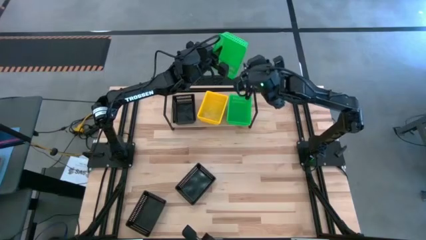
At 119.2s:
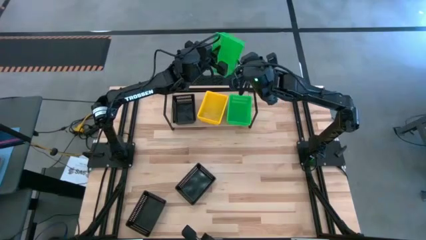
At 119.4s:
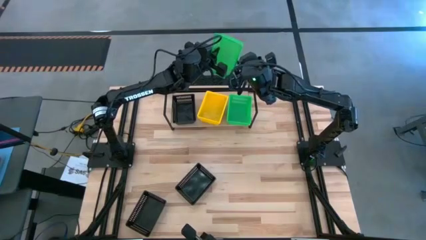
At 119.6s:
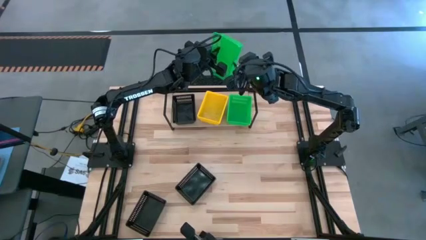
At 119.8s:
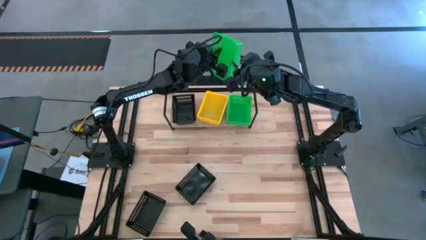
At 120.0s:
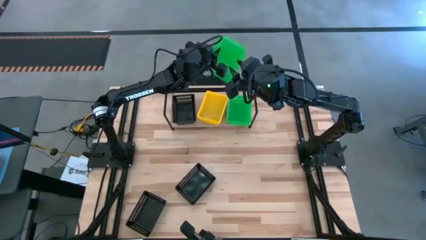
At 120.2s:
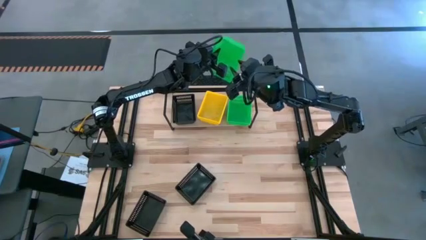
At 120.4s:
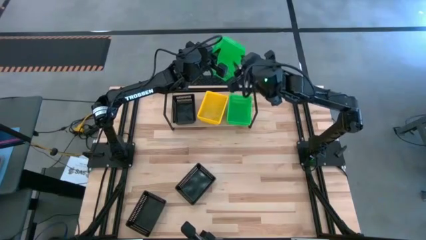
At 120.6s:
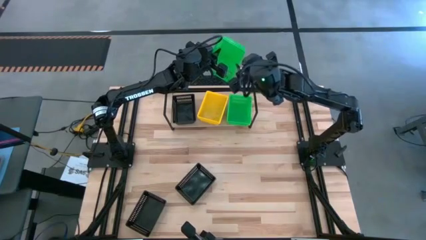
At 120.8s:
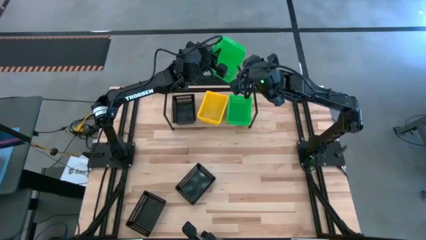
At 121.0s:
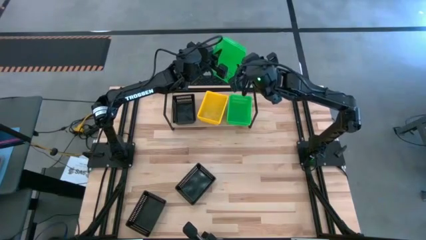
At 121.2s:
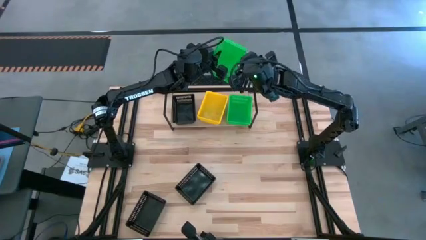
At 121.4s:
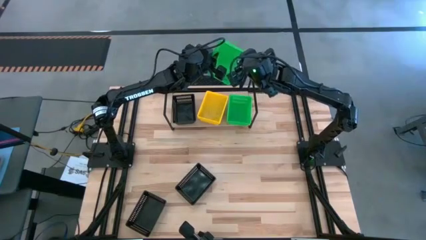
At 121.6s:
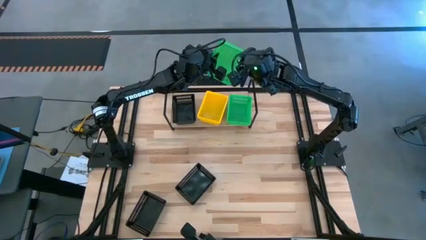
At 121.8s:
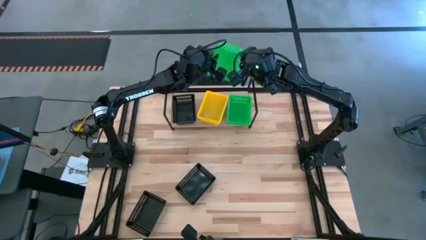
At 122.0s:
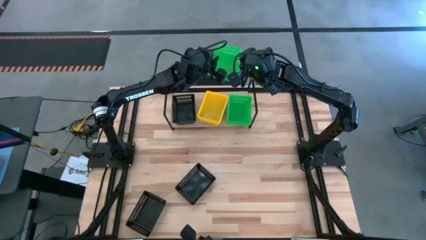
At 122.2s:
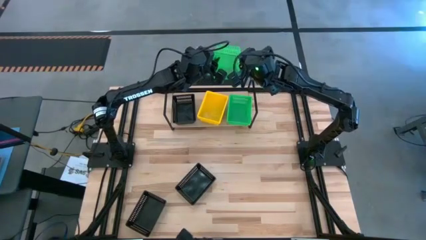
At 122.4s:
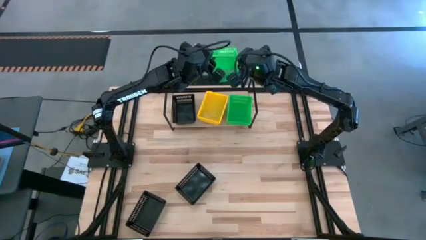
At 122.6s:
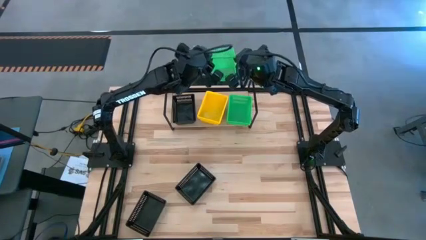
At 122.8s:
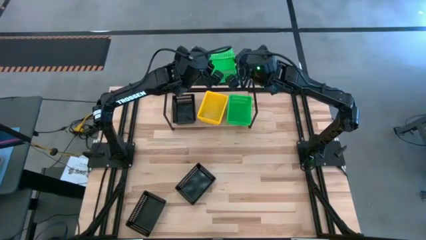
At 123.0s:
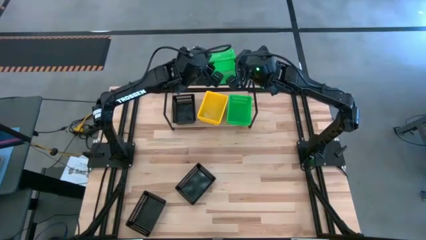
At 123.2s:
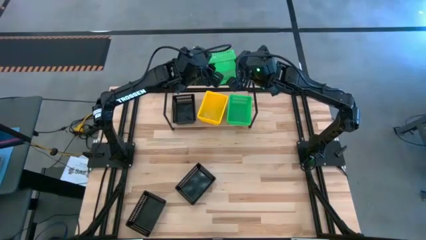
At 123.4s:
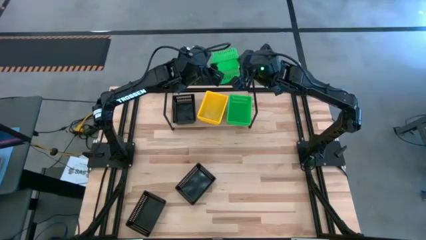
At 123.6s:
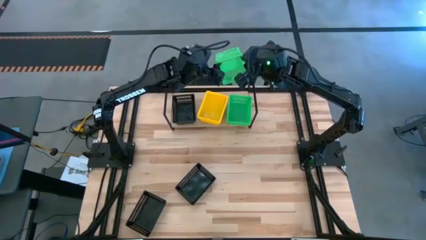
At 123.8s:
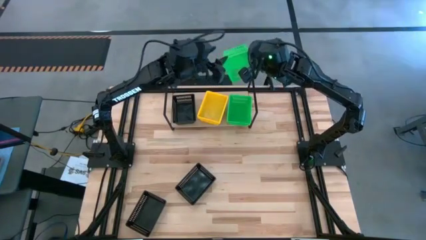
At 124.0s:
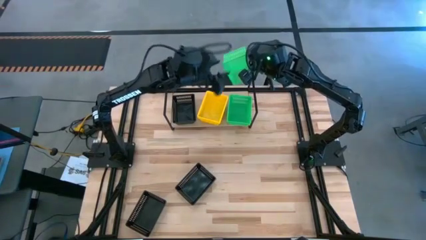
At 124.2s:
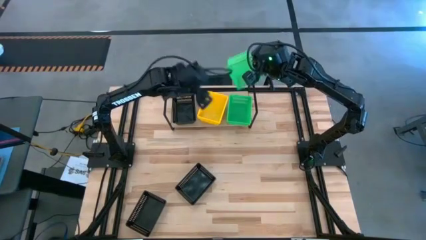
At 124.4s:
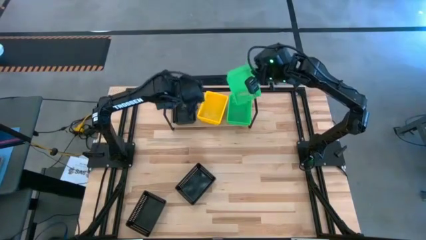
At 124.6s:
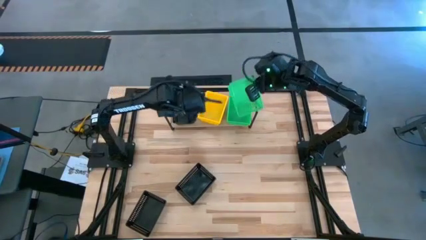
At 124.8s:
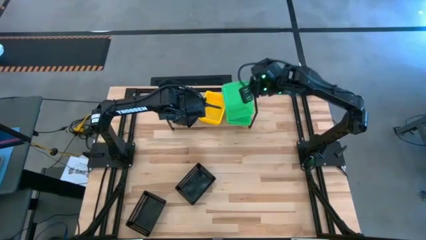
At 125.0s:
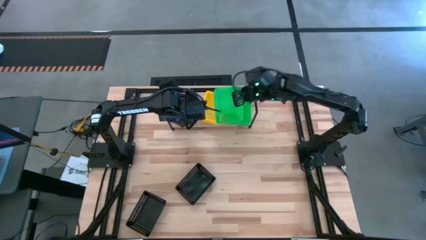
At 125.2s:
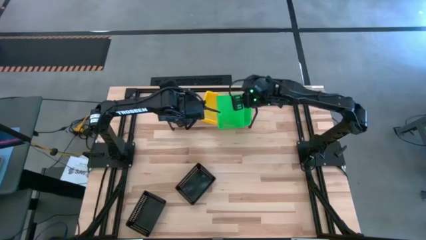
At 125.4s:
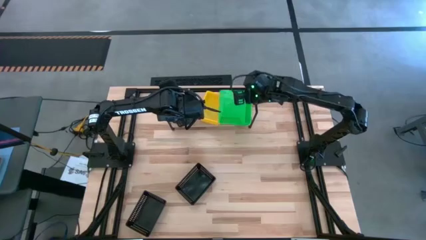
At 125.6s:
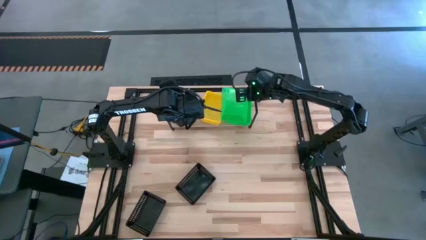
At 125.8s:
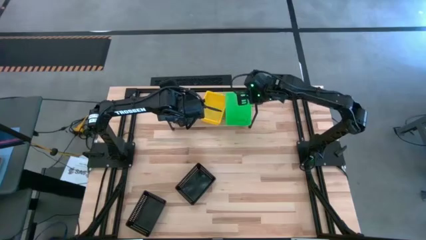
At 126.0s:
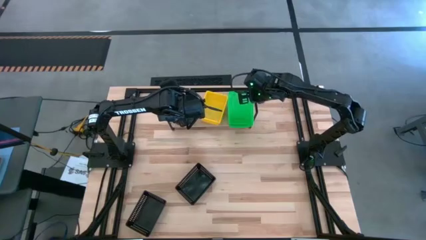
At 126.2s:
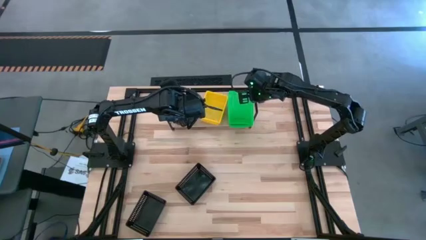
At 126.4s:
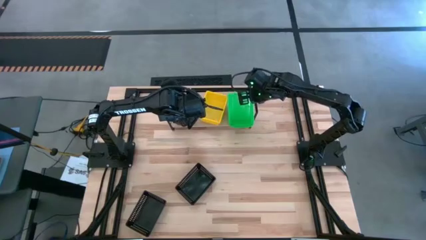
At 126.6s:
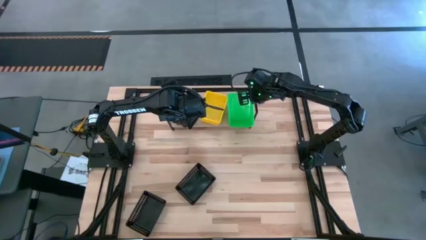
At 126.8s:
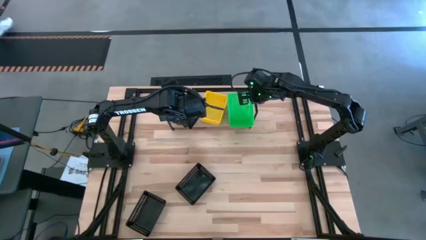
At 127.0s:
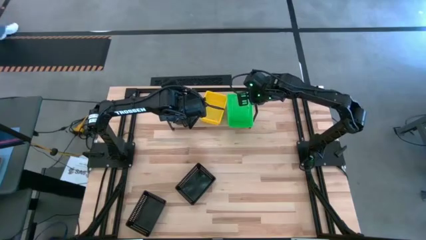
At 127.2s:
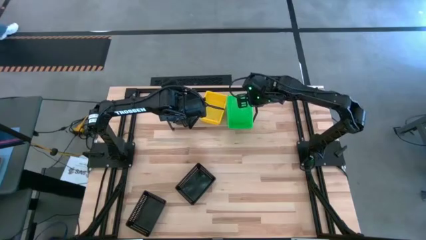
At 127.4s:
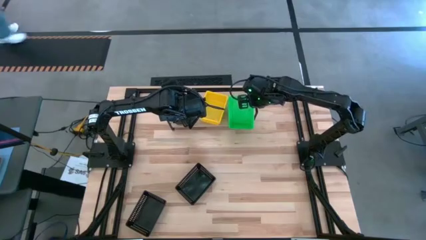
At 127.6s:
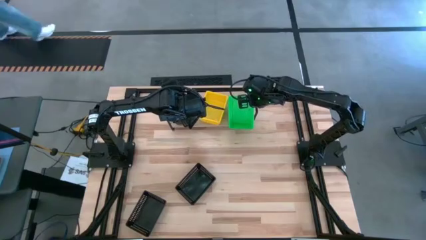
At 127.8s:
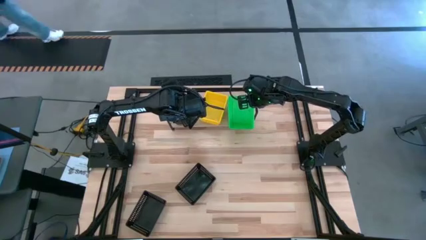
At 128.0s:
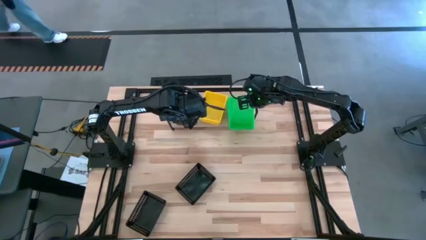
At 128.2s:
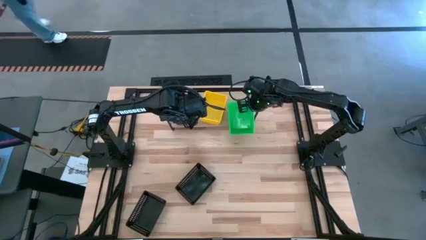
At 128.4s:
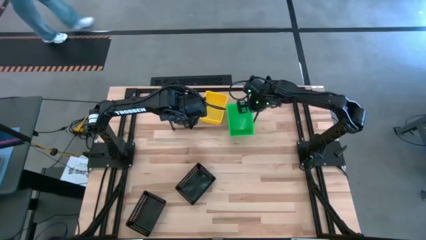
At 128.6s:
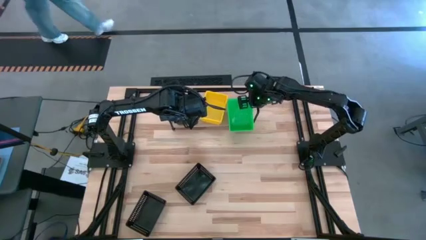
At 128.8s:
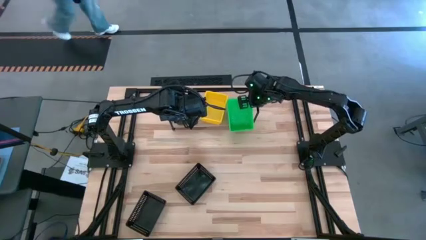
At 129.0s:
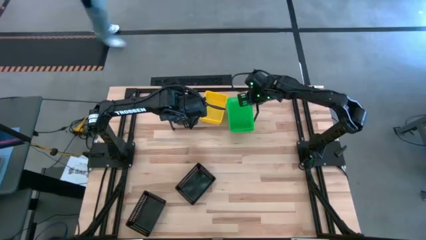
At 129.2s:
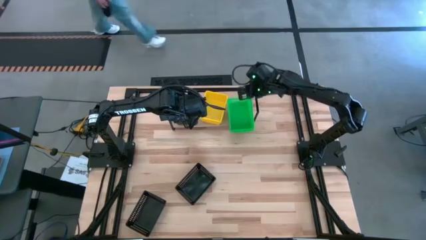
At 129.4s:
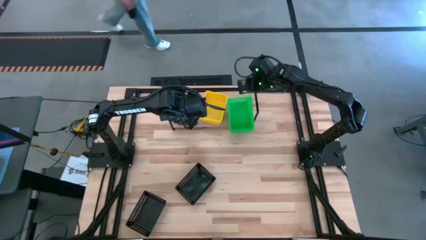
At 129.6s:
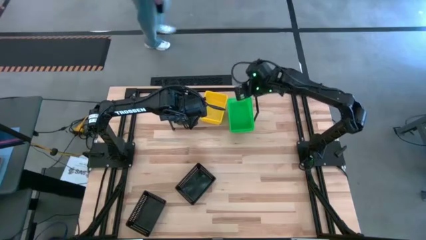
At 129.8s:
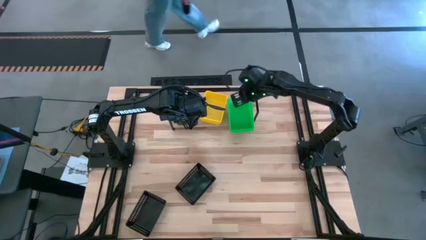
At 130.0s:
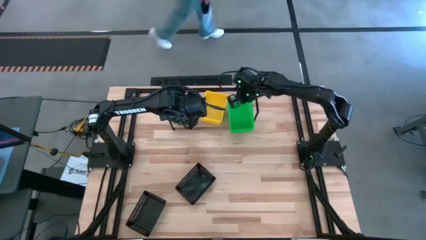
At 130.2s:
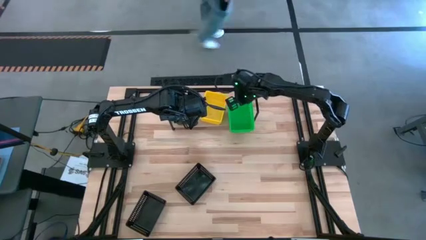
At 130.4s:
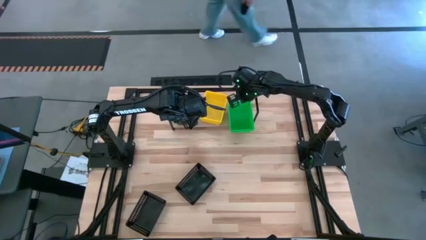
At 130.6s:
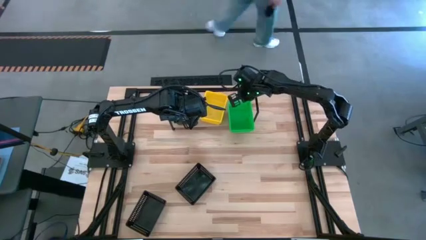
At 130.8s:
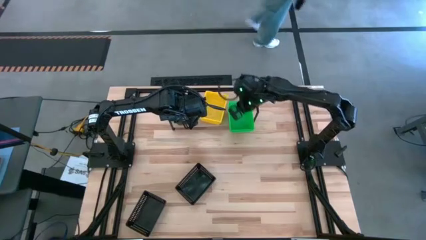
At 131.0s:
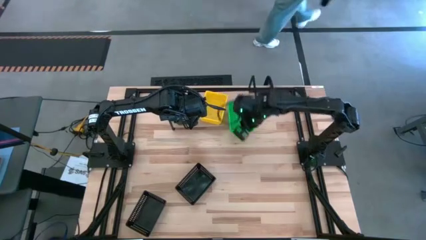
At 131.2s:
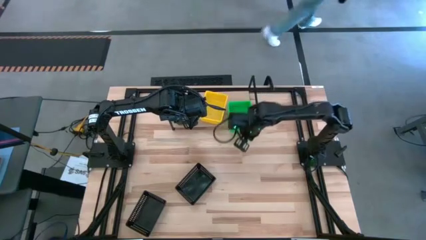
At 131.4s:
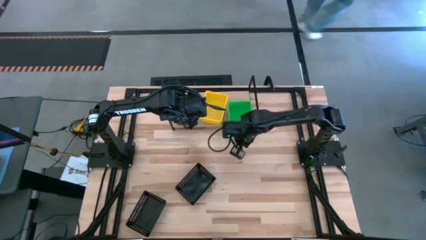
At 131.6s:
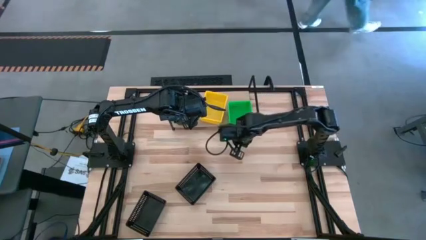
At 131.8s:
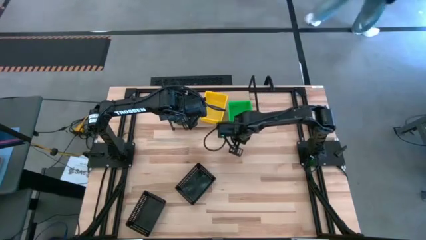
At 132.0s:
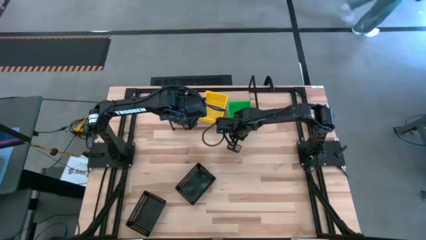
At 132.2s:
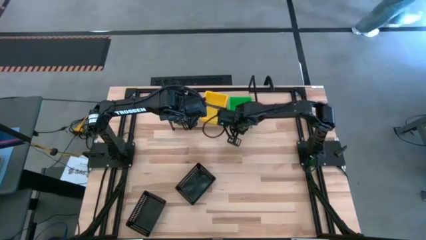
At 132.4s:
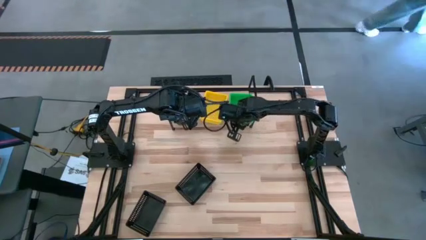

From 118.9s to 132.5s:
Task: Stack baskets on shelf by color
Stack the green bin on top of the green bin on the shelf

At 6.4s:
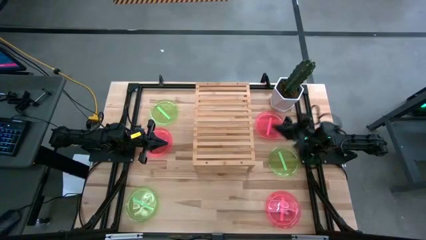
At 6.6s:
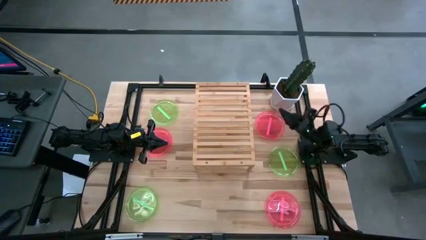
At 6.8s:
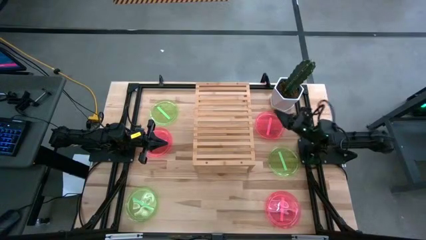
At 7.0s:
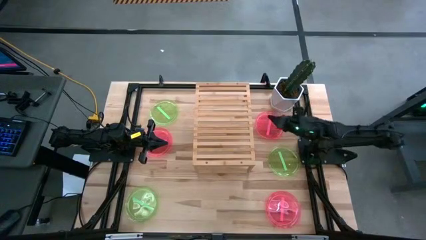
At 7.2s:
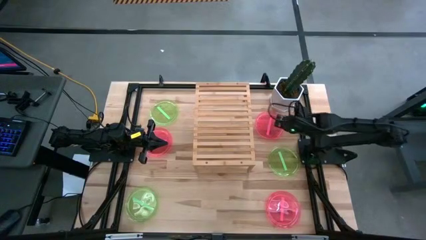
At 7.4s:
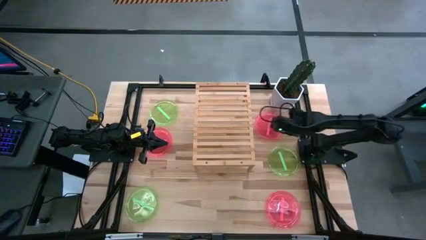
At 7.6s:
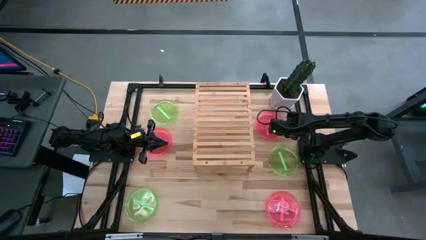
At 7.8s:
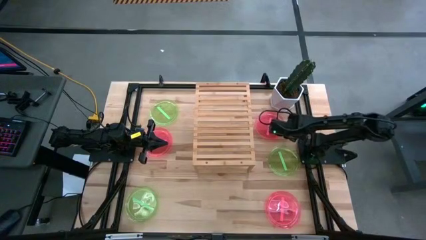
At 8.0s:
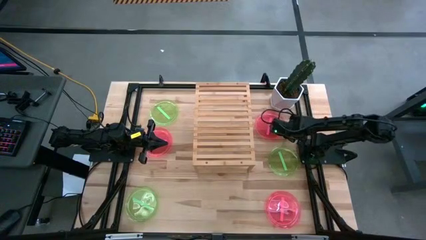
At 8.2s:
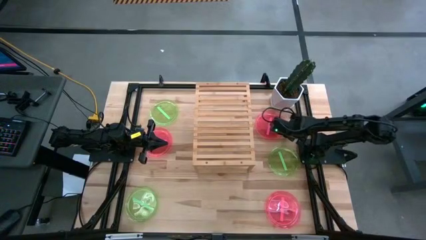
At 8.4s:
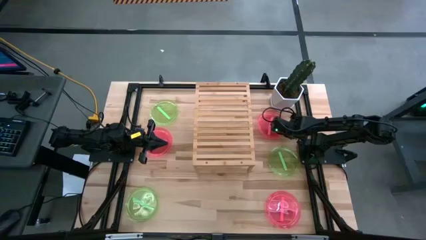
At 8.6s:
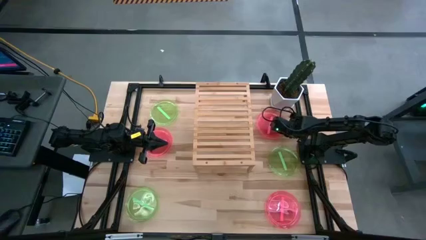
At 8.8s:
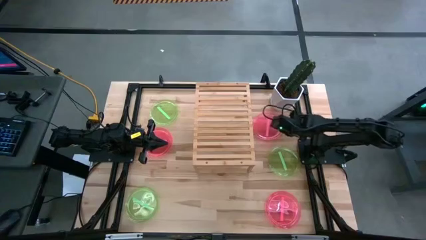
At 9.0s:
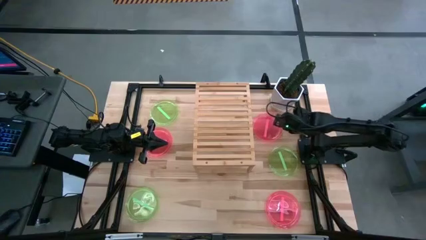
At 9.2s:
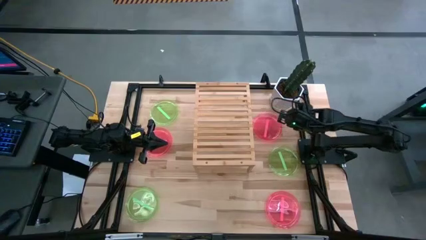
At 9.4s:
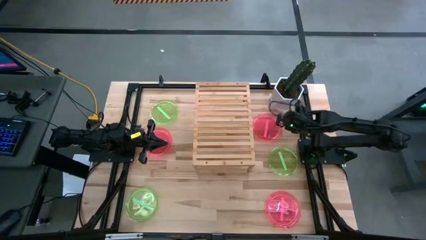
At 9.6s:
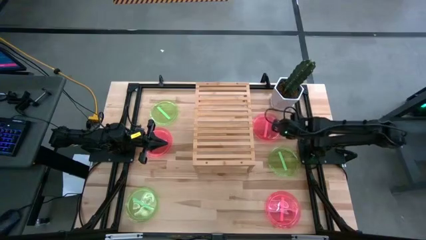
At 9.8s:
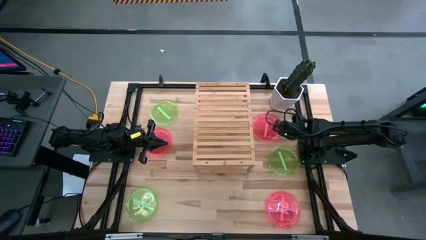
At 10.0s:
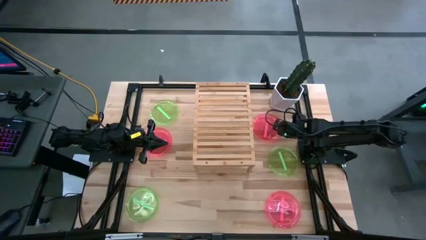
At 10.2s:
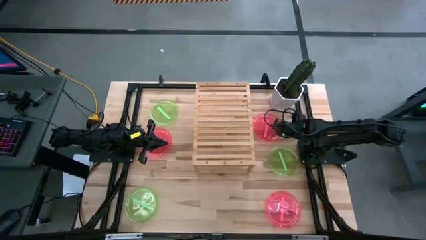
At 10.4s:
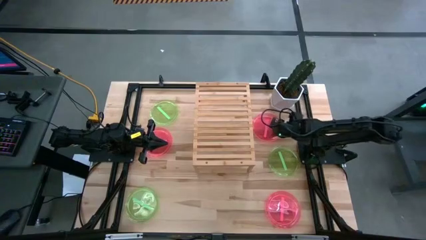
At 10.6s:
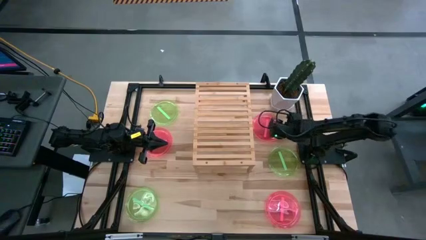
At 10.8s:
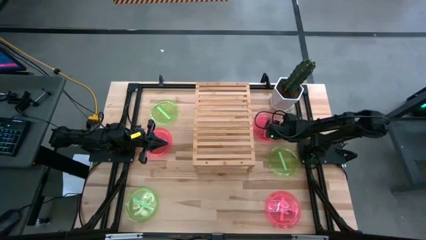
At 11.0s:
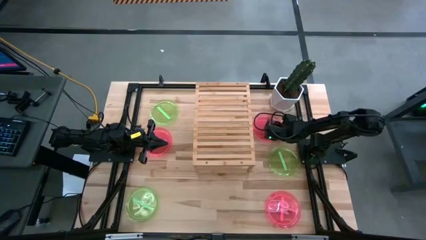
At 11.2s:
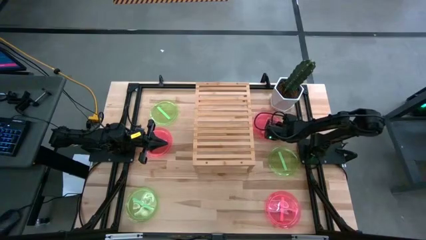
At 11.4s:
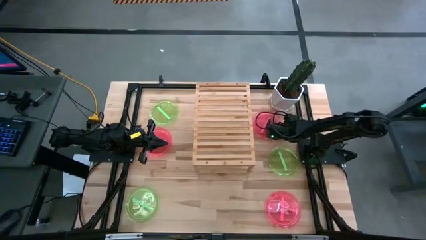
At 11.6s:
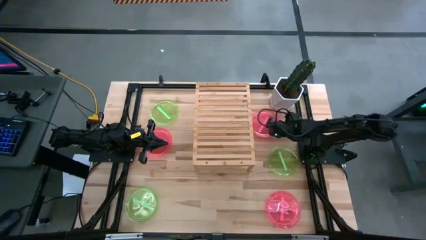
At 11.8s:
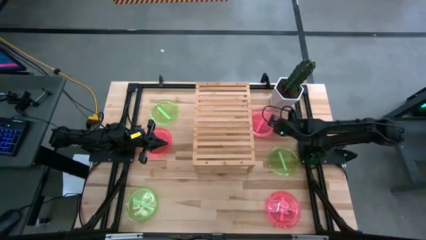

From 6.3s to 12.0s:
Task: Place and stack plates onto a shelf
Put the top right pink transparent plate on the shelf
